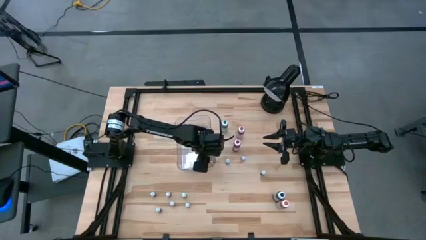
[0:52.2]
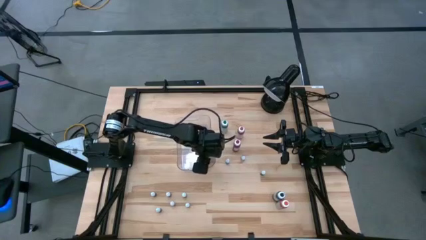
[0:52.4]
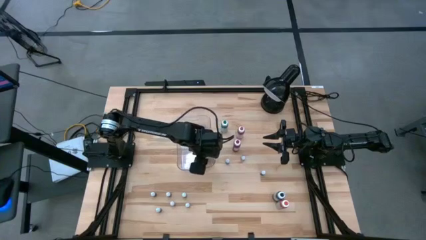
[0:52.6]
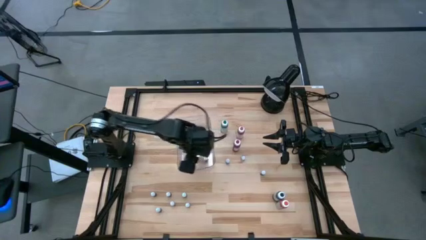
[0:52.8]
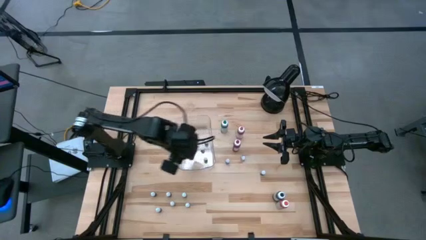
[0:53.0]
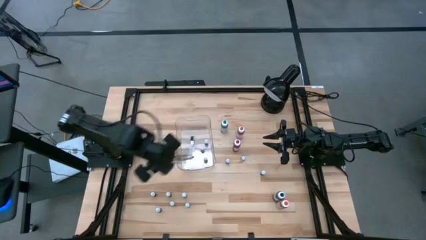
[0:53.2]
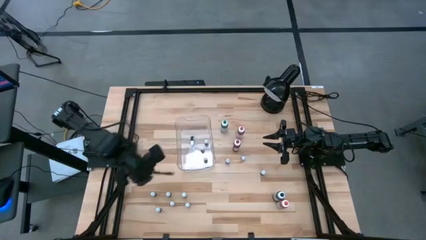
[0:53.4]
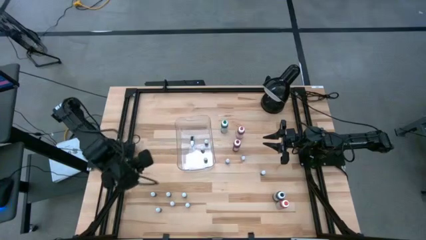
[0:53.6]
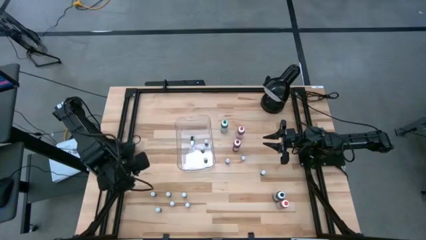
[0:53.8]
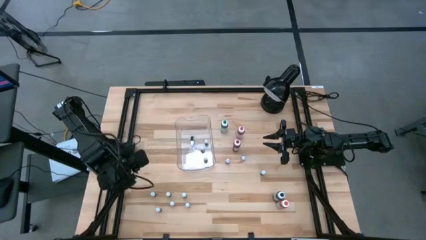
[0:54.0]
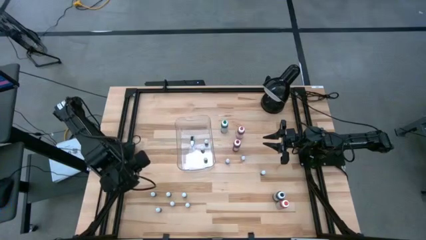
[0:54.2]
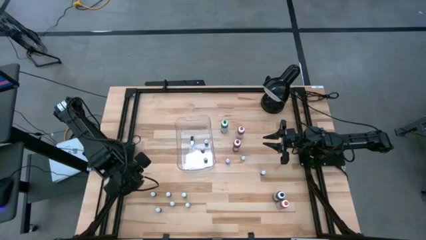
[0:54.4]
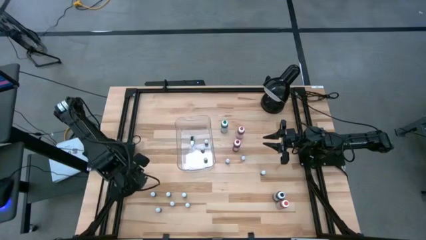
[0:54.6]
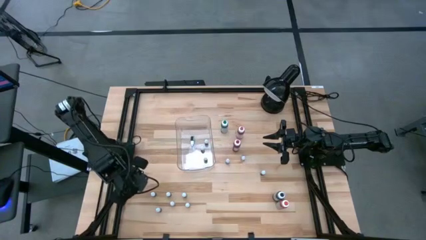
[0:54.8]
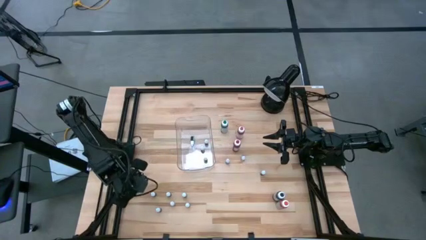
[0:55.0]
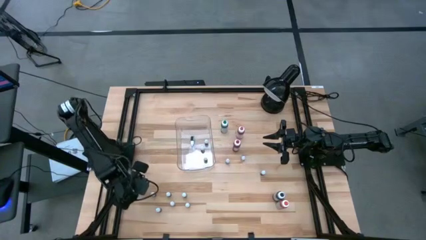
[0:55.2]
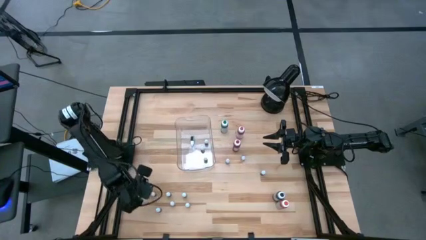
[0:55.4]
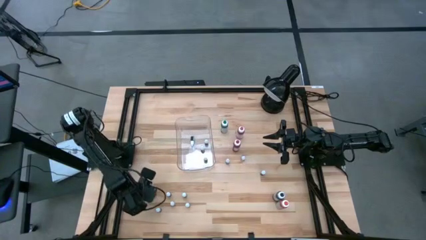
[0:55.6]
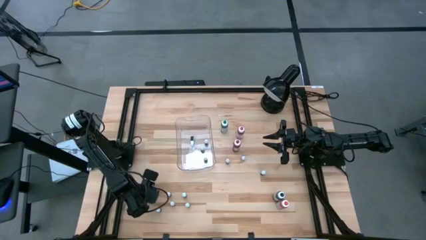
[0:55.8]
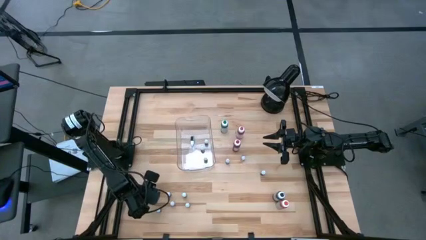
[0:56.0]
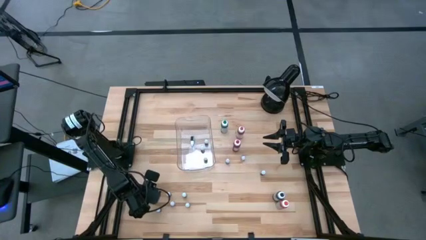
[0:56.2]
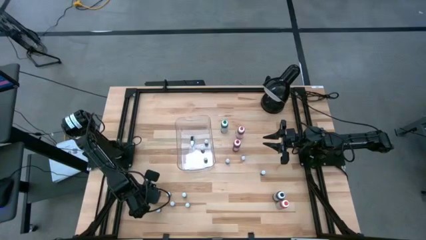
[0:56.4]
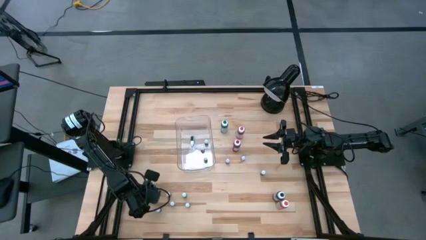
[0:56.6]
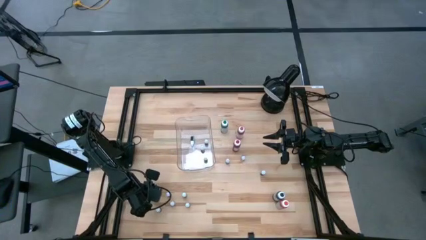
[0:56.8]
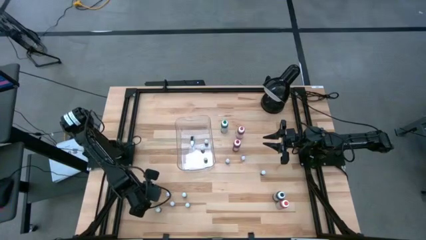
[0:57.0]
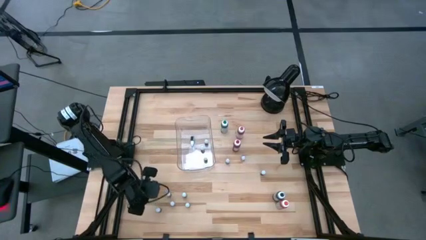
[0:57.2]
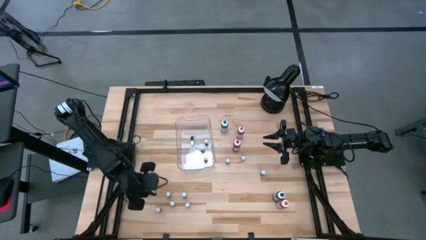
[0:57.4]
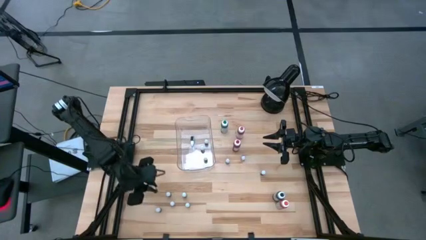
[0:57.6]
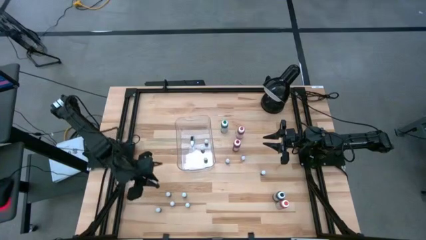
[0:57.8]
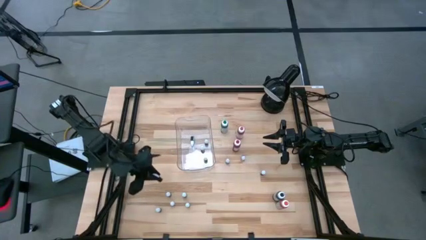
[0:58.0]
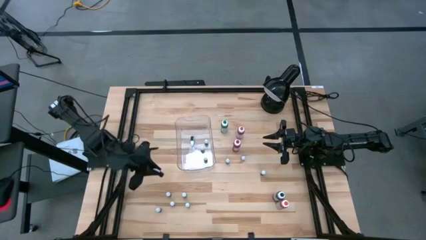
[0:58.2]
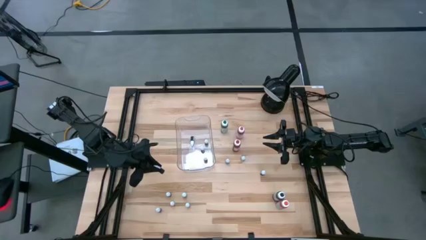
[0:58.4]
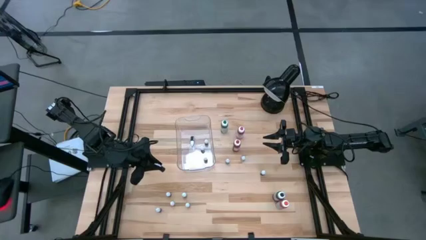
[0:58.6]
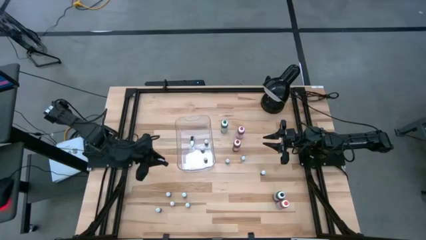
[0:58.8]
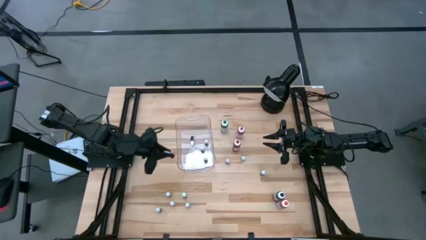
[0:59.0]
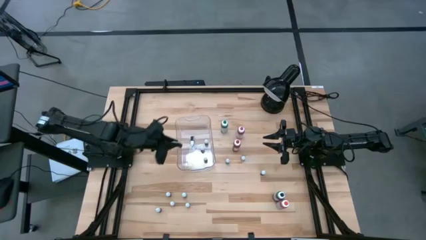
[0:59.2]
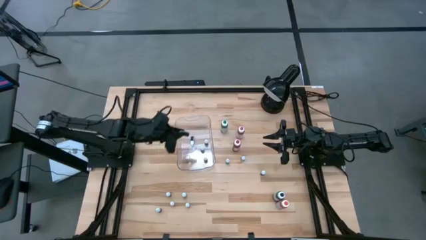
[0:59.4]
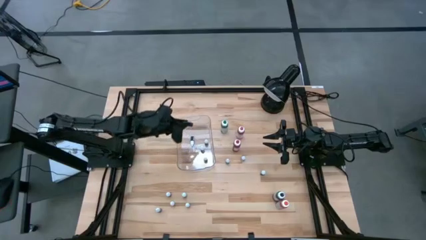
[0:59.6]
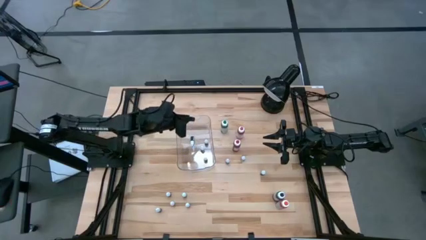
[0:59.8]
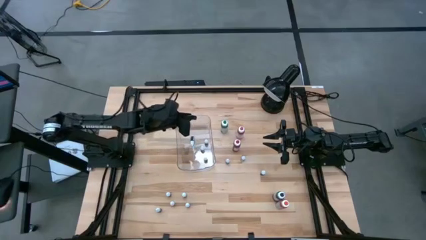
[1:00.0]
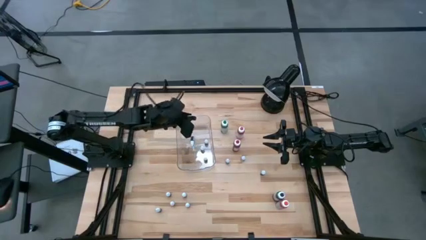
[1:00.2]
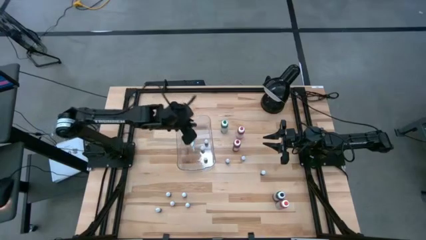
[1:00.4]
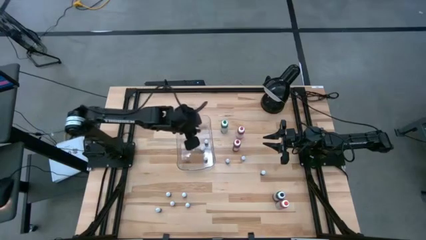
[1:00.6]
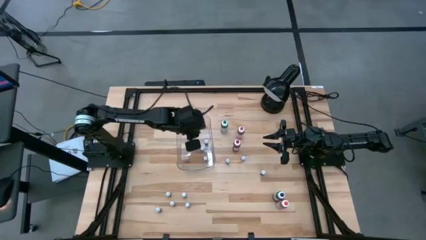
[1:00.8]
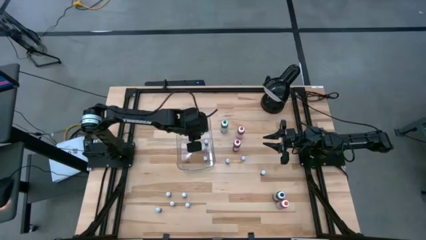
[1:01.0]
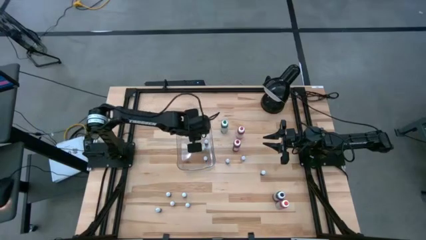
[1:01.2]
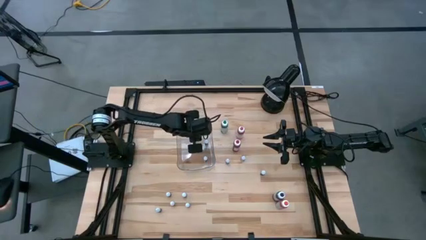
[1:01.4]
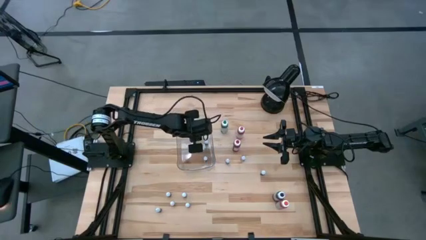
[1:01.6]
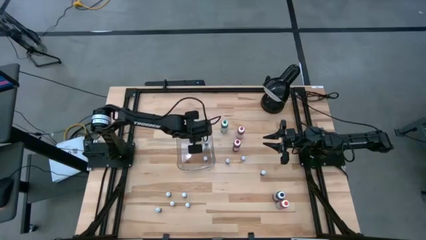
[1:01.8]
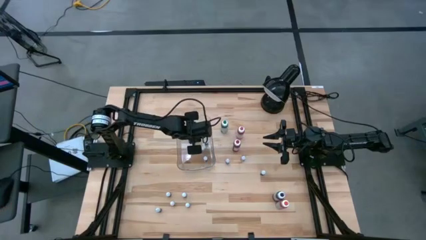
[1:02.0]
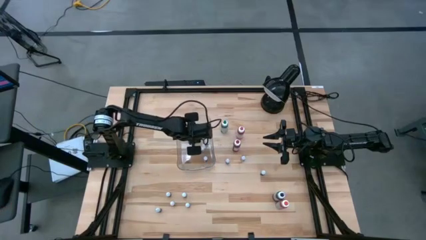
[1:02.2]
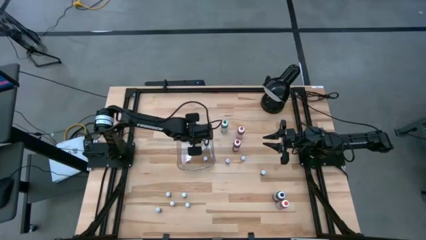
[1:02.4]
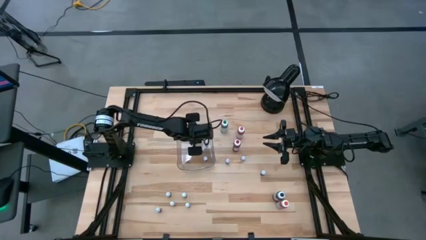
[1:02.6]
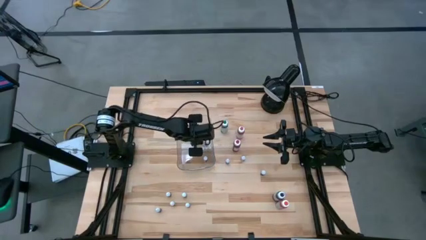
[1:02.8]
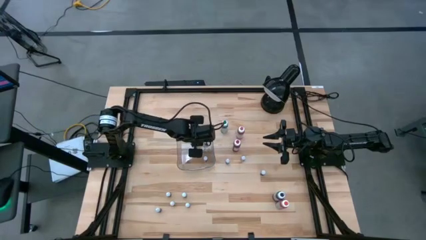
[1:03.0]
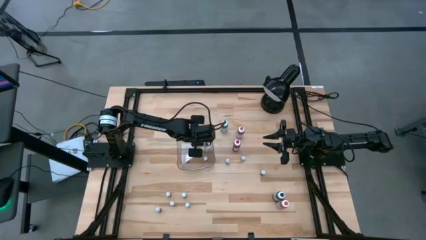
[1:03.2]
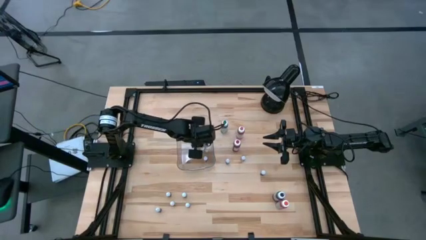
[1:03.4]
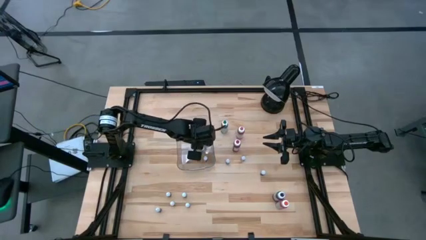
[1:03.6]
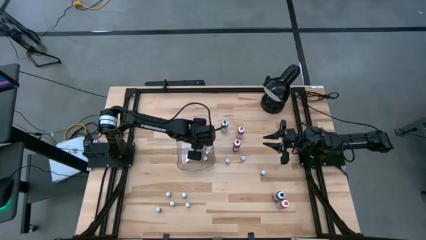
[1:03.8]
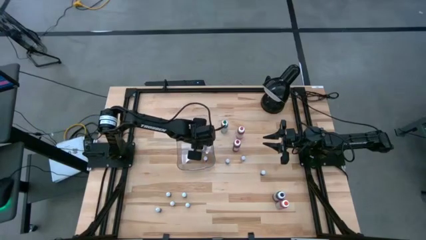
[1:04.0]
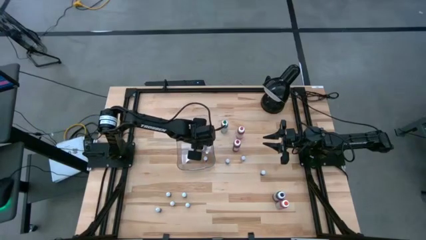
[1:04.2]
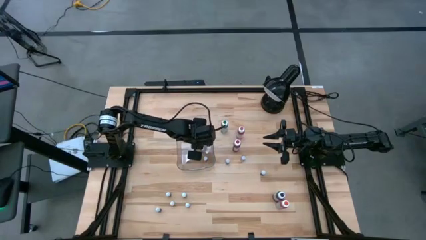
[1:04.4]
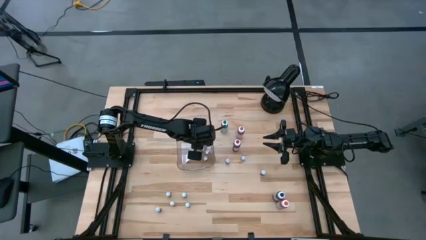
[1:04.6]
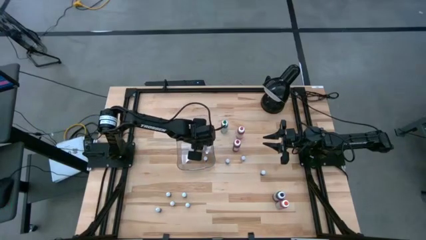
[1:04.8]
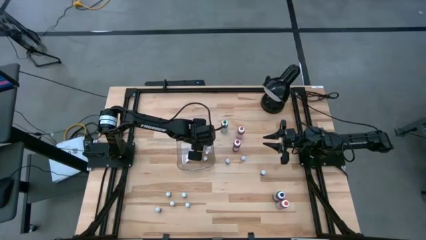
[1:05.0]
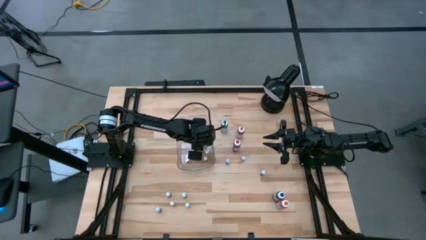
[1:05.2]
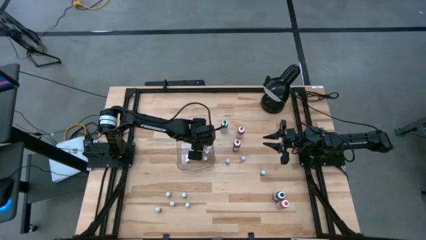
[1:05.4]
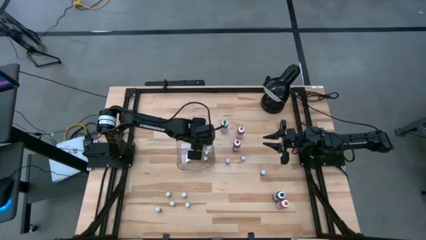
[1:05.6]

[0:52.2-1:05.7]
Task: Pick & Place food coloring
Put the small violet food coloring bottle into the transparent bin

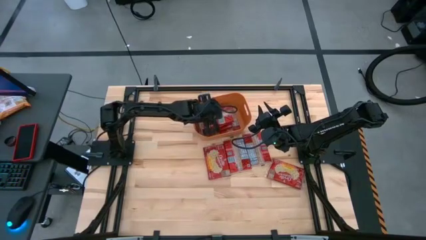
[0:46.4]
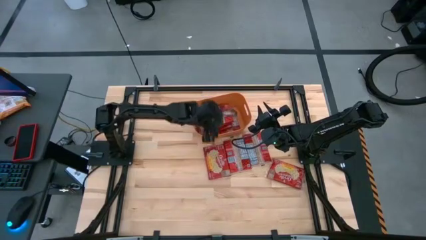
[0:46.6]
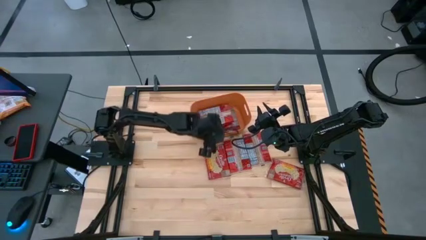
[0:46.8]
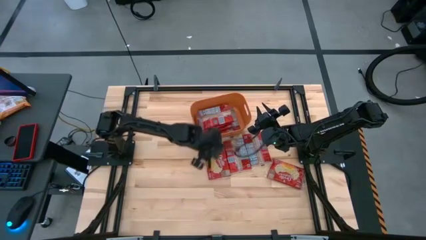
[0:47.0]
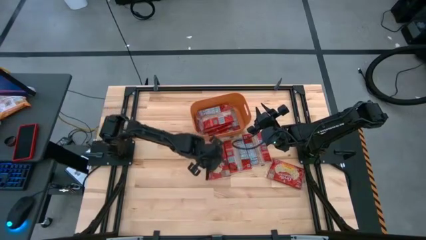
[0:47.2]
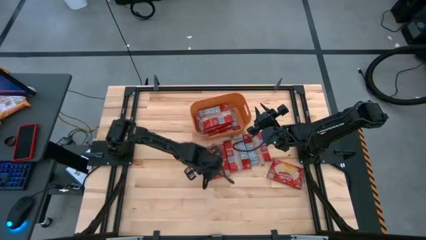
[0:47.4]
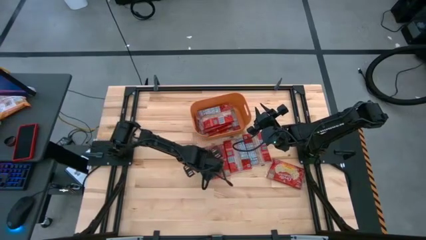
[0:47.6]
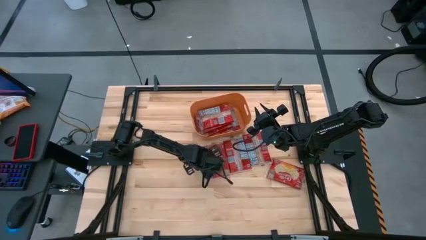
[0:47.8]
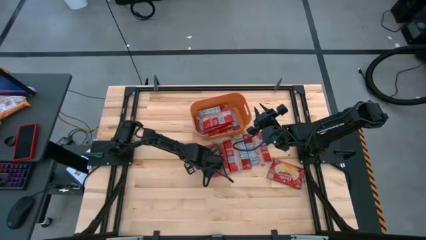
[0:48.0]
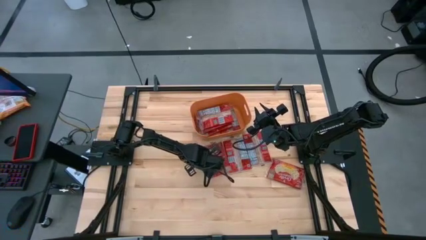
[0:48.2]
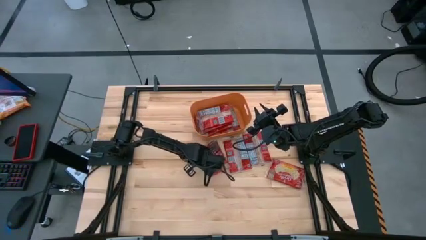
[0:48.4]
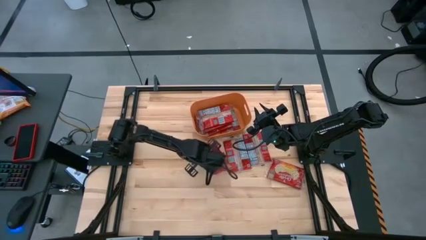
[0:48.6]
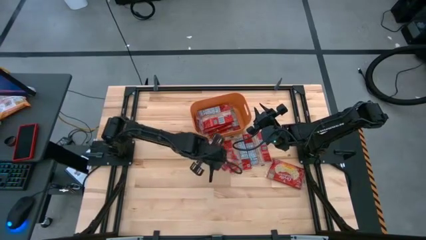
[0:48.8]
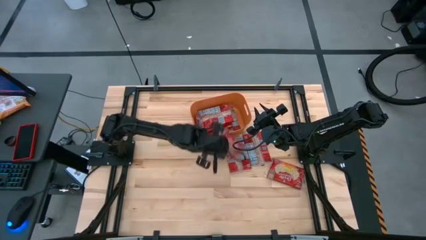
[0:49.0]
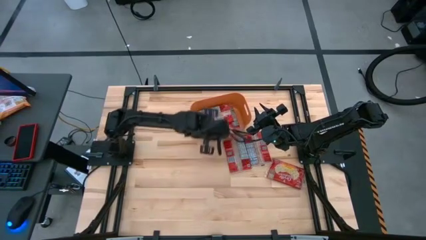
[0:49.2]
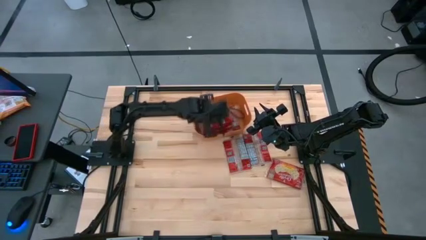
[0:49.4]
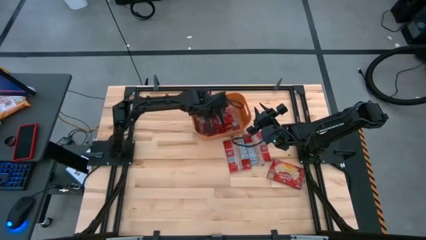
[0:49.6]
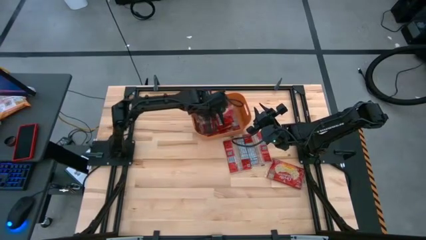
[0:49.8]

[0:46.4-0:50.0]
Task: Sort popcorn bags into baskets
Put the red popcorn bag into the orange bin
